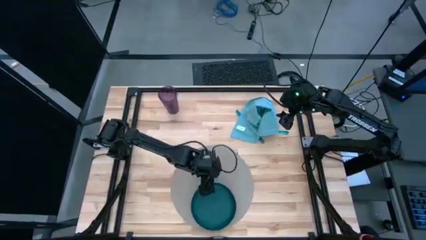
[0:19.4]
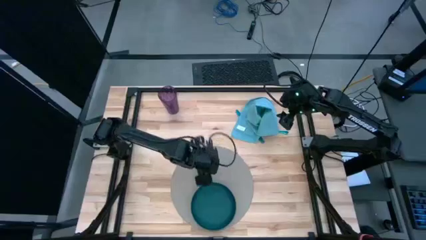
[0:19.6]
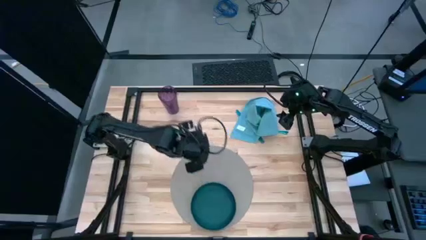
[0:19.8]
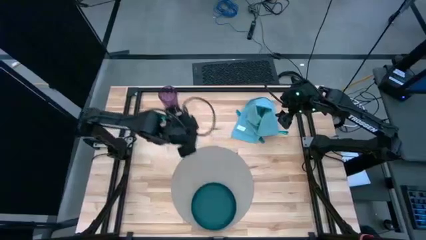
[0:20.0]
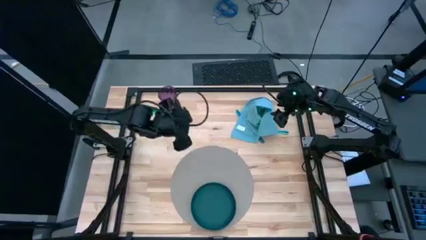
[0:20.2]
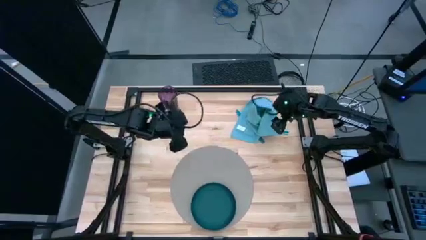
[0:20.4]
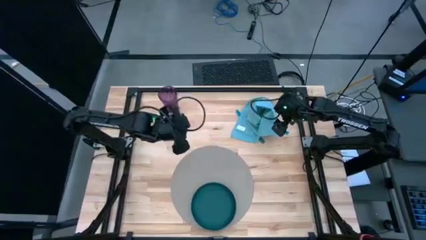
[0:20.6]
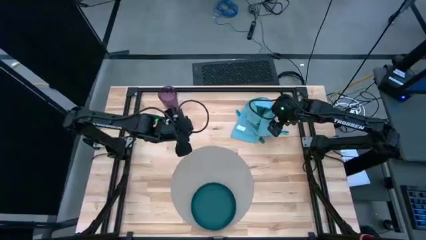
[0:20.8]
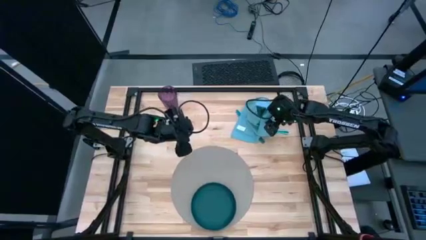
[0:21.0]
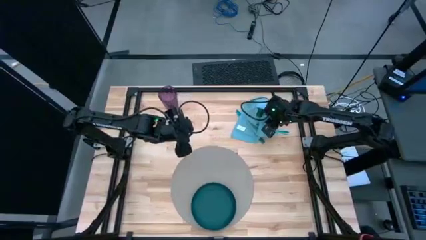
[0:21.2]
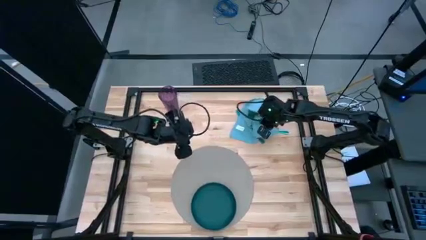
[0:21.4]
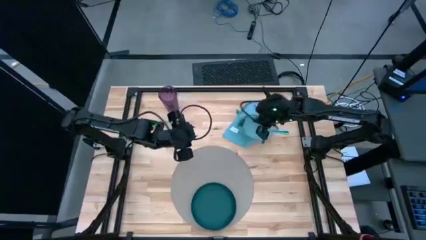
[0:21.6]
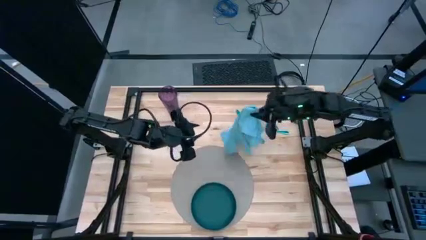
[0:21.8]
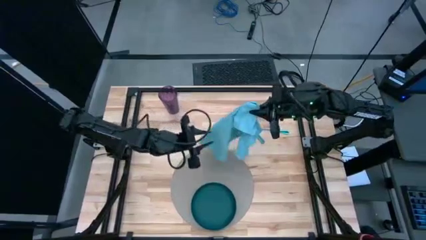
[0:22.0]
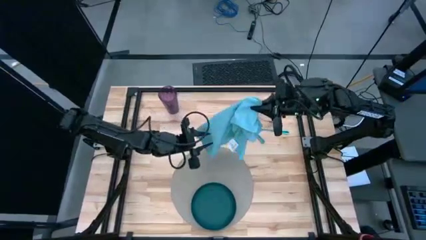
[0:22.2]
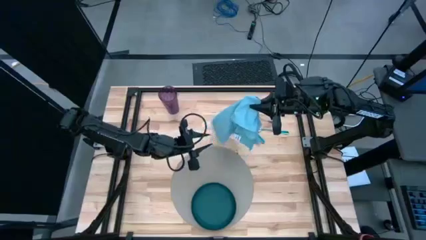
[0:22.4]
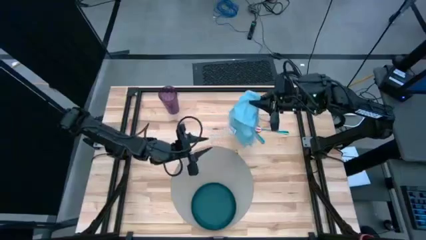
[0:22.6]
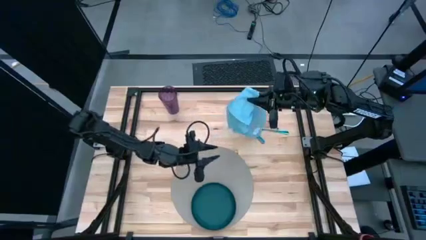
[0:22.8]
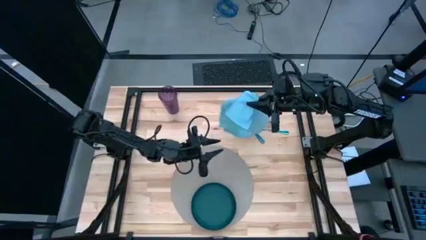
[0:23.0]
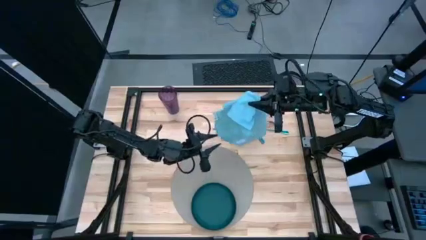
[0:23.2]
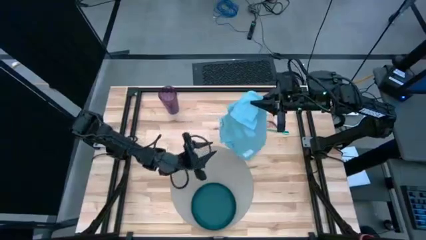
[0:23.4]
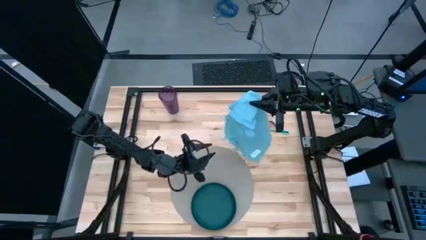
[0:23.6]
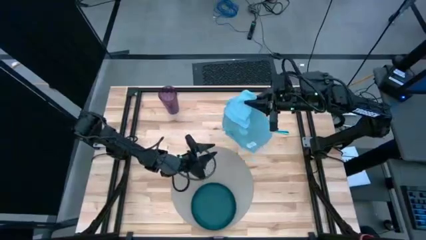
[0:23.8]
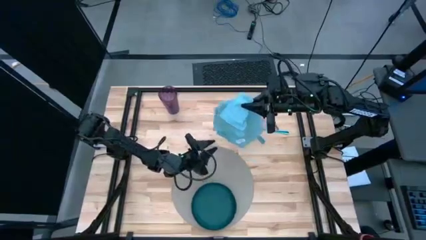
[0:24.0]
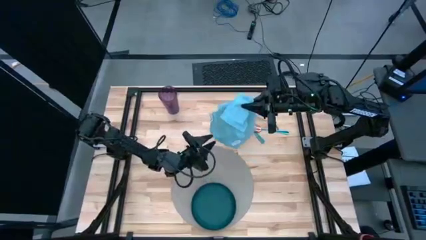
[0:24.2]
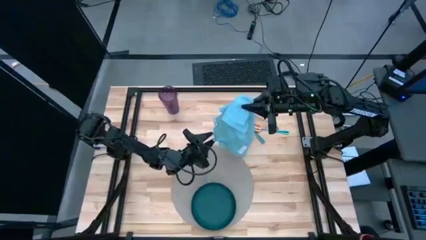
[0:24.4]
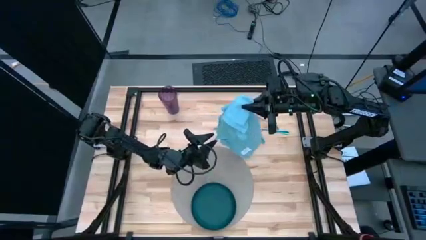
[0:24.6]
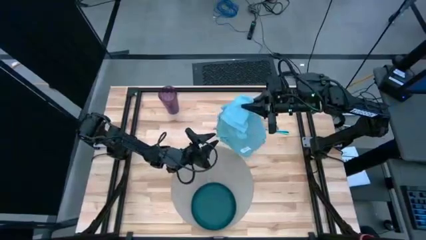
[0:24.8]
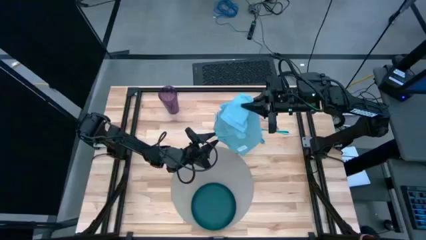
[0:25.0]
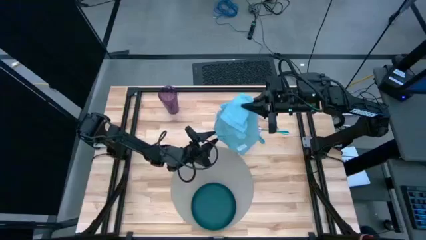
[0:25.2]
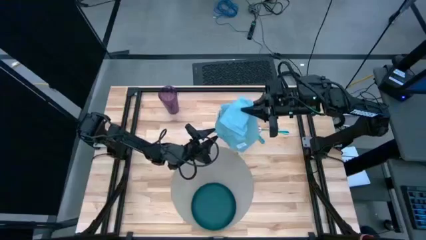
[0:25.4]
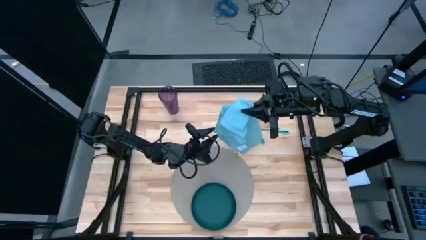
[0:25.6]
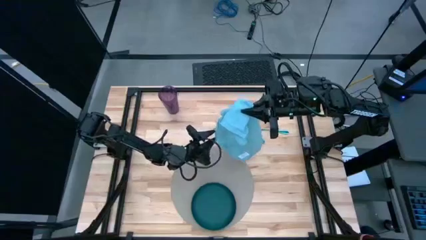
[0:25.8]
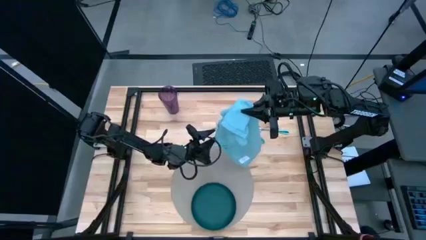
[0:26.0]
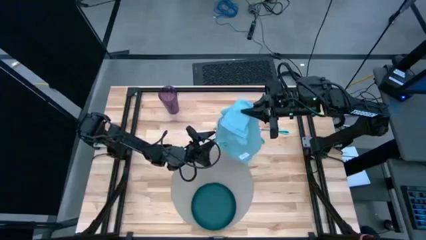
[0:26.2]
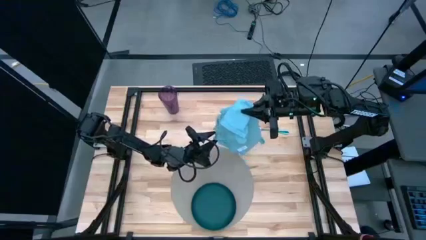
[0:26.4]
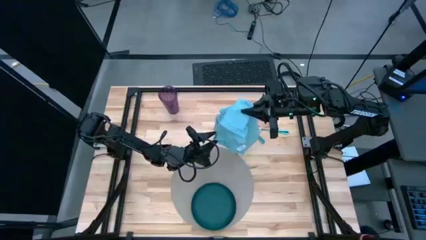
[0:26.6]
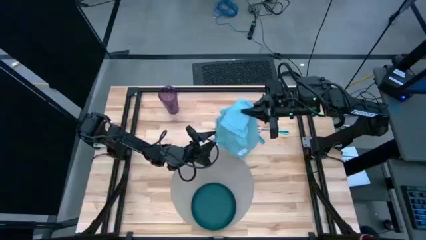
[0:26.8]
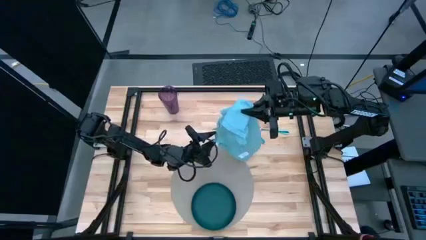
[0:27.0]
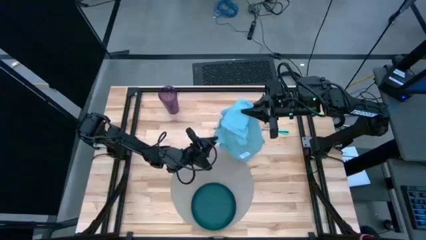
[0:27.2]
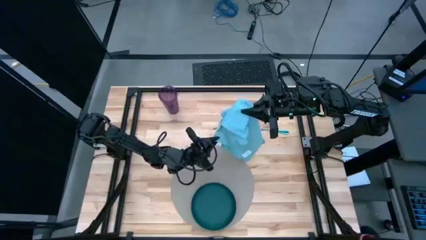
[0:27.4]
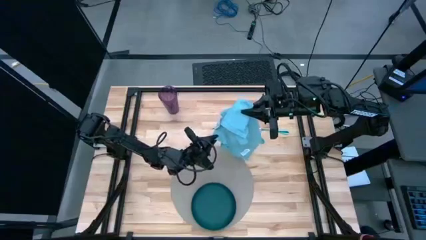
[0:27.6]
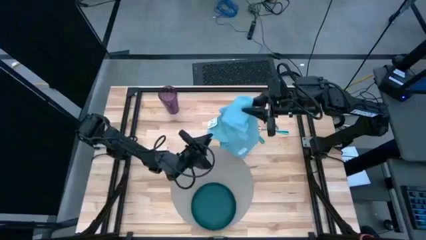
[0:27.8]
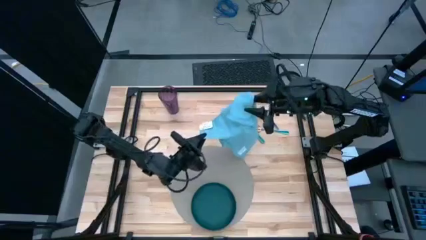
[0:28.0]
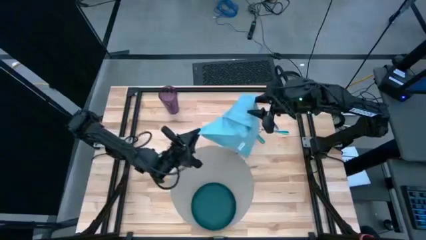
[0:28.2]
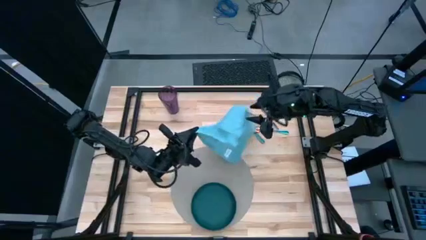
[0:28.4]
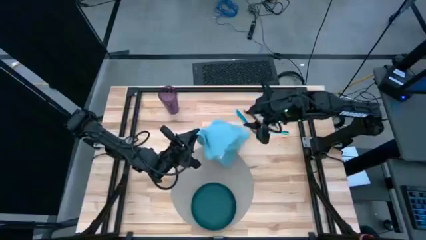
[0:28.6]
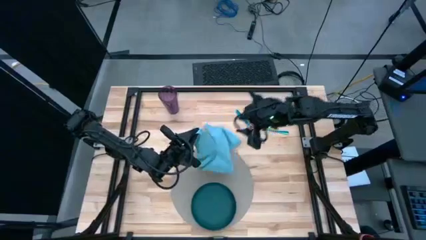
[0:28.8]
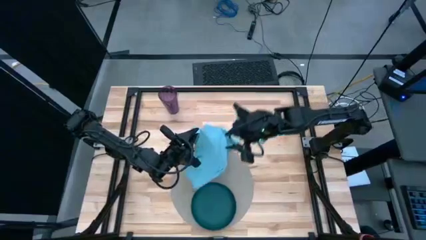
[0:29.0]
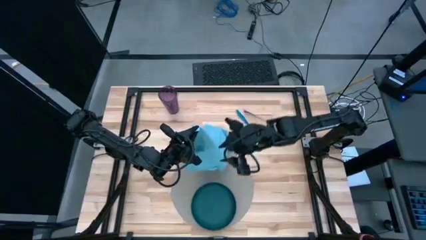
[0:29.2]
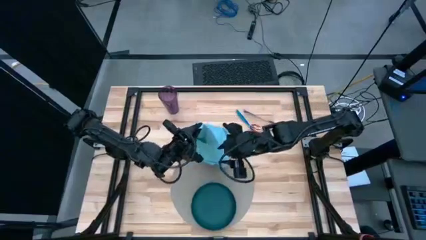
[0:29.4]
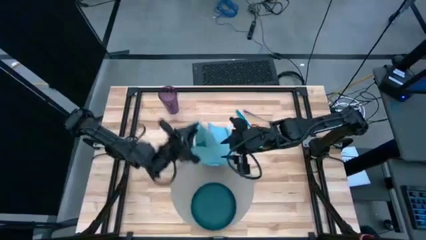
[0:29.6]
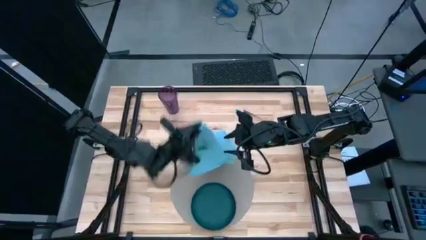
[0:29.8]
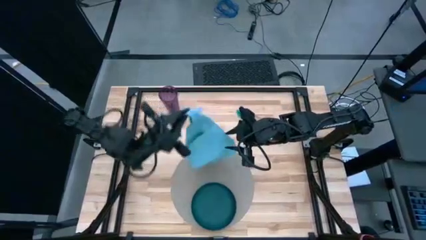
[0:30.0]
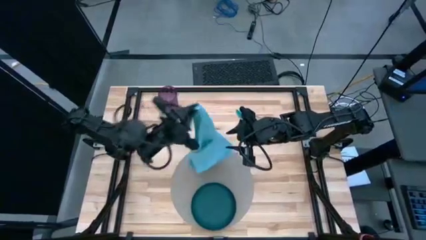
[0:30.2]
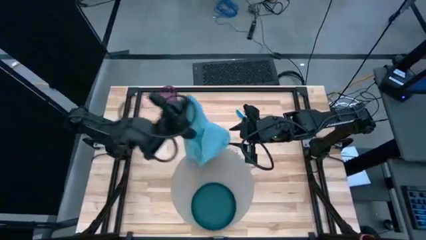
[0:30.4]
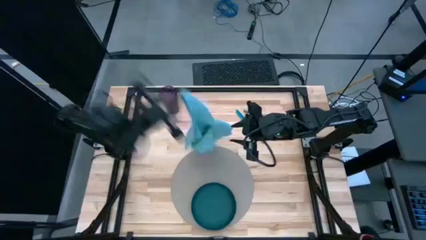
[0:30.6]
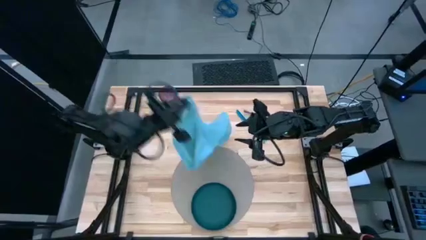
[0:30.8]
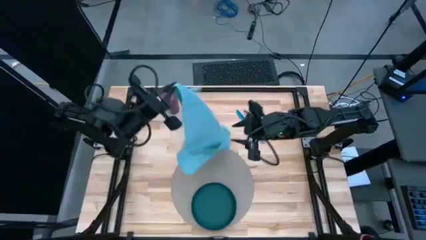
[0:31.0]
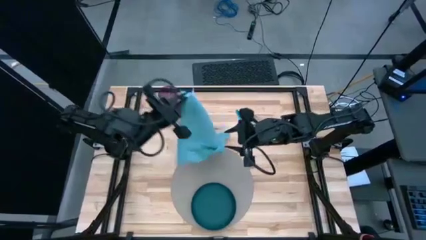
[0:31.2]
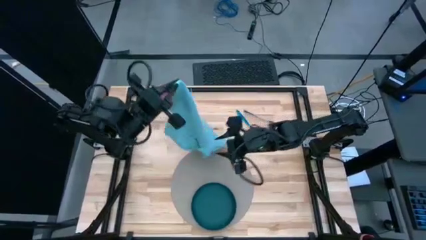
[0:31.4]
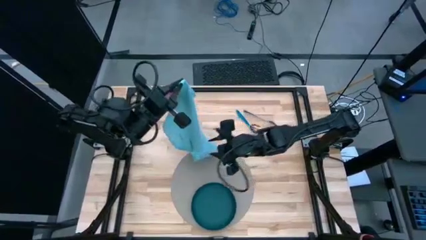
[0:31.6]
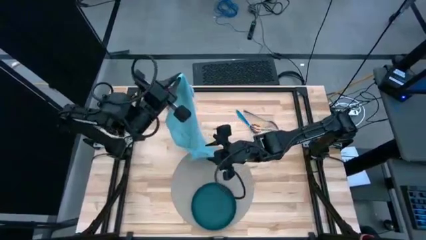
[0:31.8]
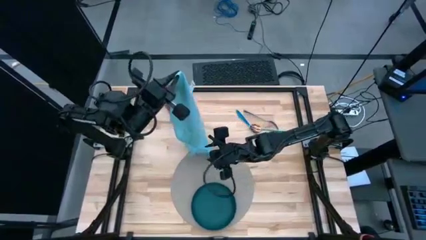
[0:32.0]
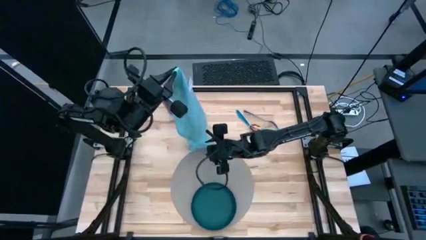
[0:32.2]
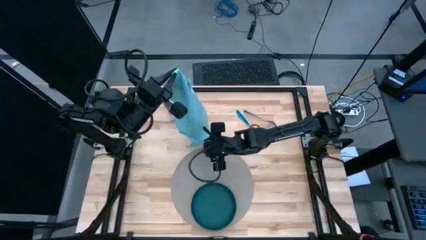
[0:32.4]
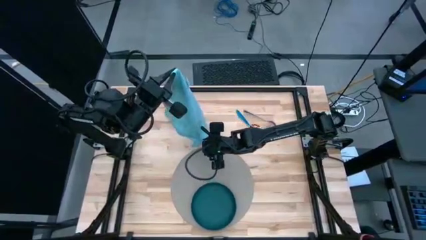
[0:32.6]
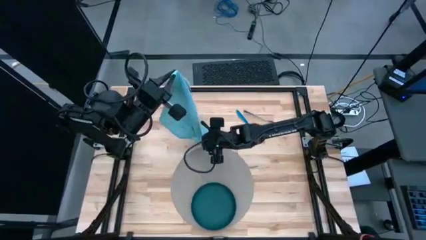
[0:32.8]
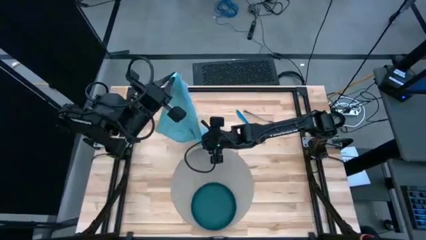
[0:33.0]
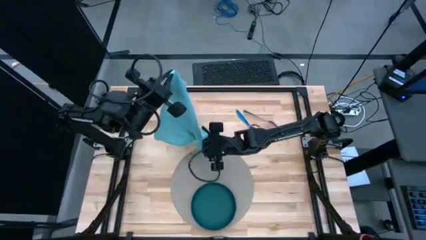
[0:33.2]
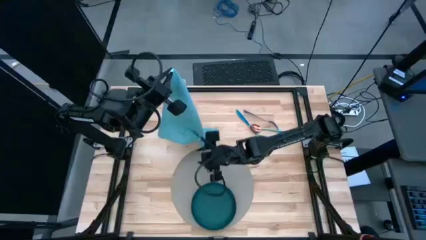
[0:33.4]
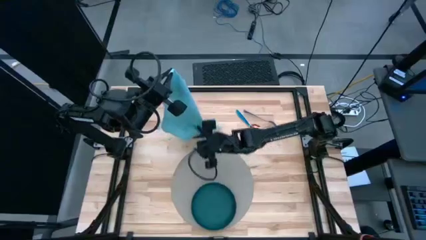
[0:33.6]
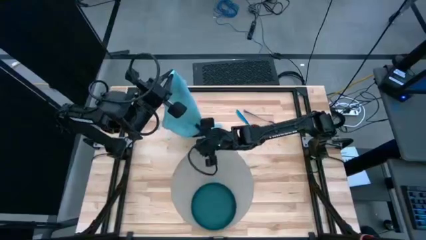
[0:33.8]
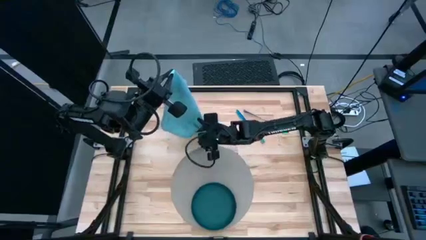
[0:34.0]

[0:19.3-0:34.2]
Task: Set table place
Fold the blue table napkin

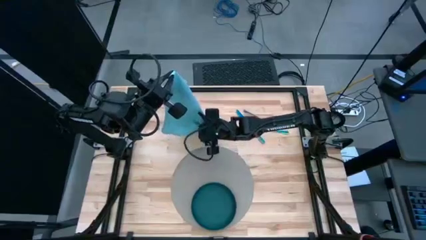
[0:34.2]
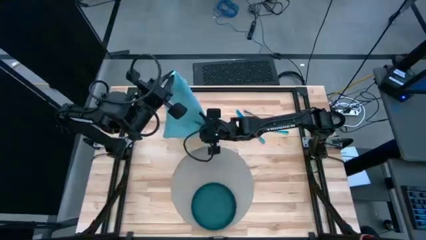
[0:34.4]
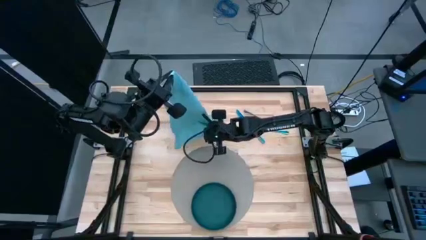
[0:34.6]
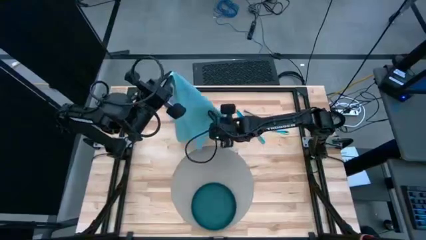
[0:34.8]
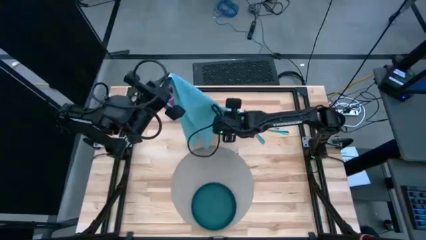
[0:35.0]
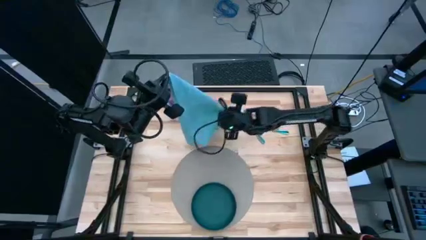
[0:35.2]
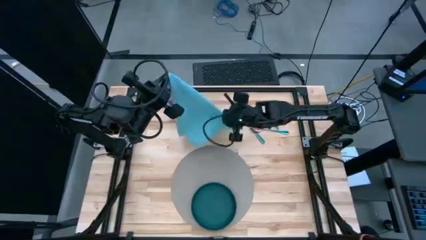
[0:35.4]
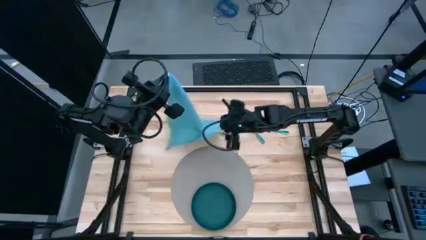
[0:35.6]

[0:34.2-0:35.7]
Fold the blue table napkin
